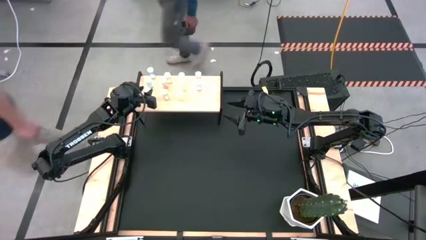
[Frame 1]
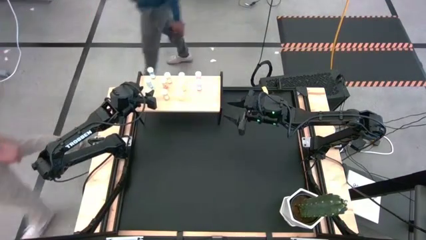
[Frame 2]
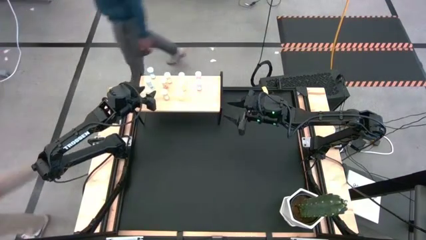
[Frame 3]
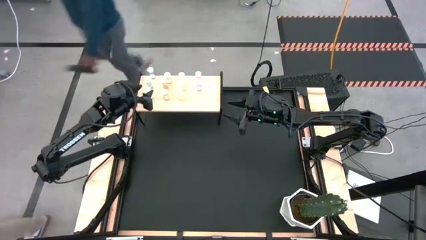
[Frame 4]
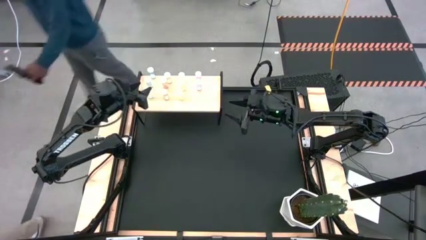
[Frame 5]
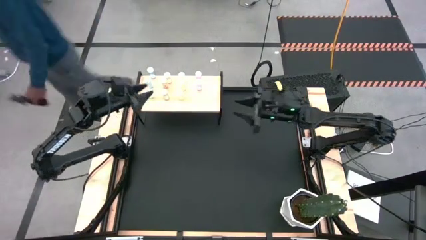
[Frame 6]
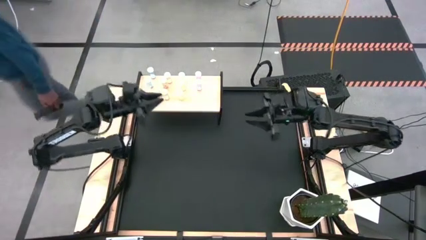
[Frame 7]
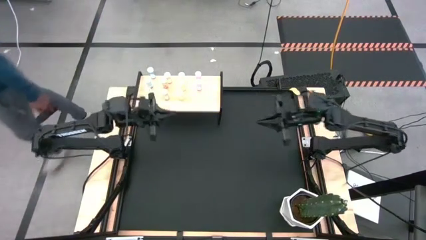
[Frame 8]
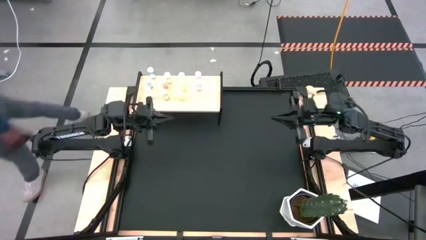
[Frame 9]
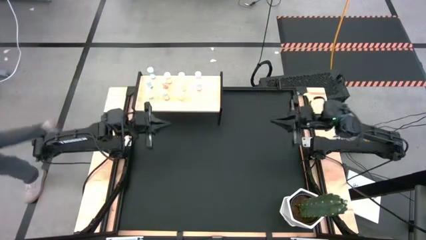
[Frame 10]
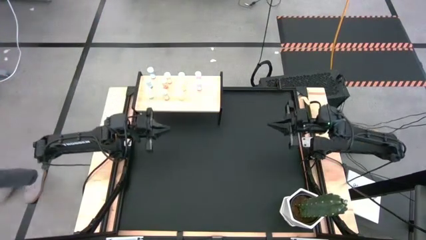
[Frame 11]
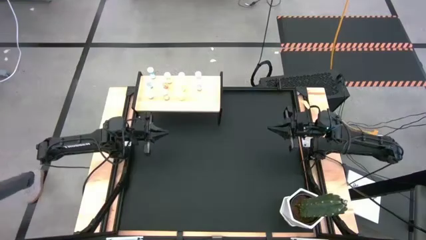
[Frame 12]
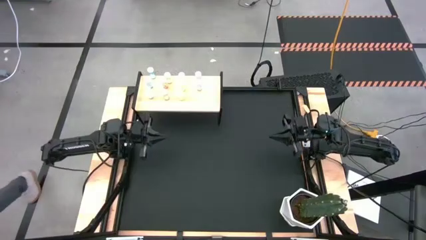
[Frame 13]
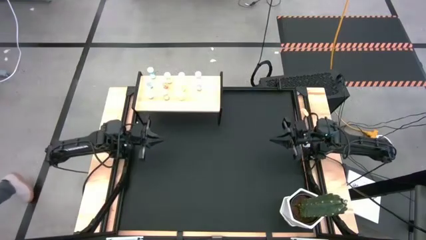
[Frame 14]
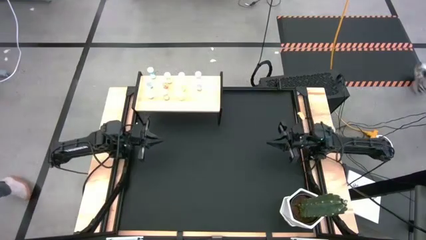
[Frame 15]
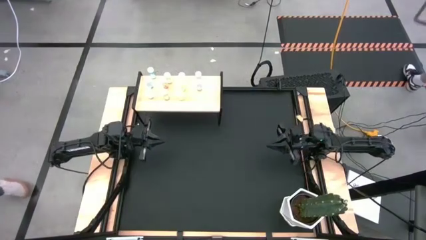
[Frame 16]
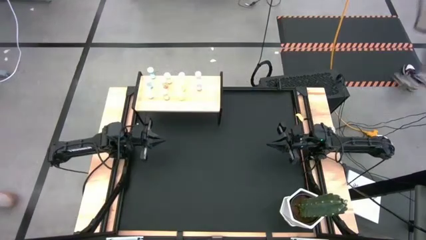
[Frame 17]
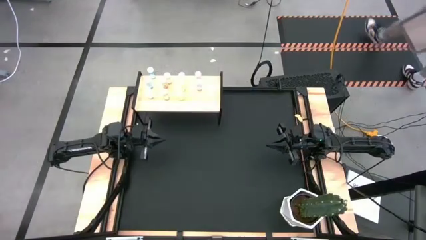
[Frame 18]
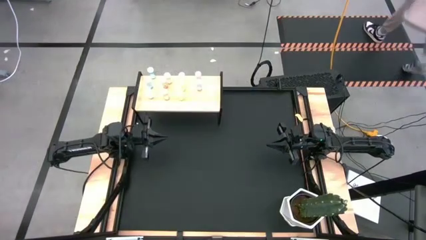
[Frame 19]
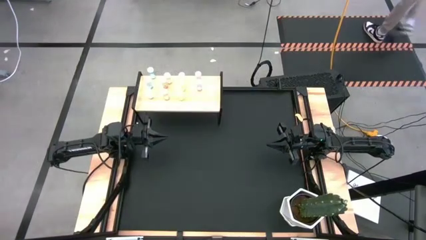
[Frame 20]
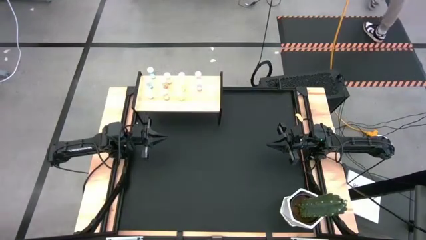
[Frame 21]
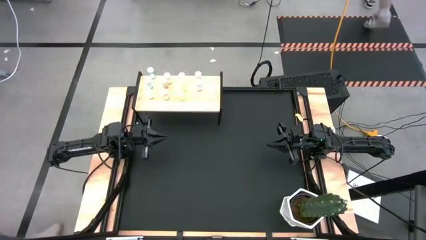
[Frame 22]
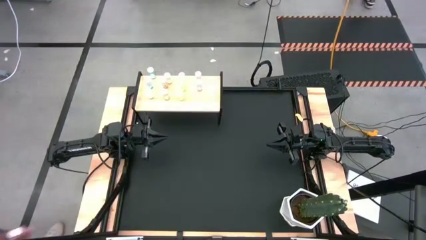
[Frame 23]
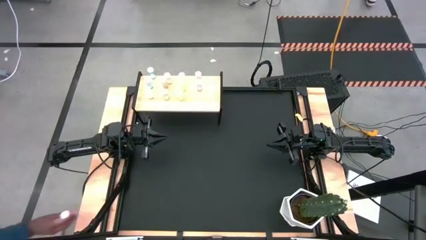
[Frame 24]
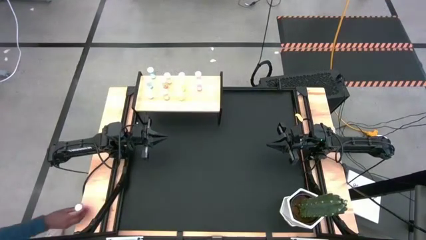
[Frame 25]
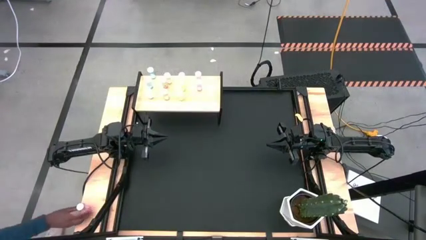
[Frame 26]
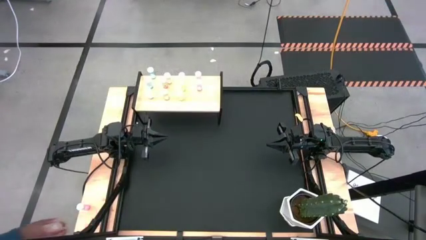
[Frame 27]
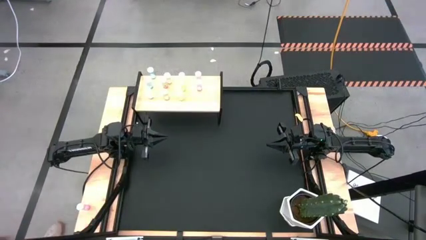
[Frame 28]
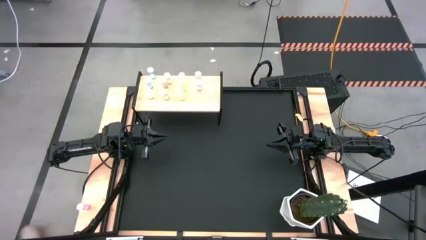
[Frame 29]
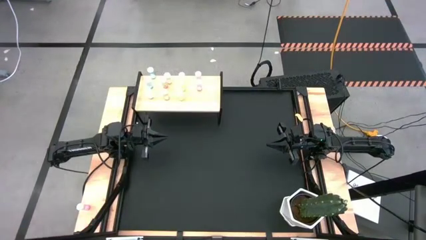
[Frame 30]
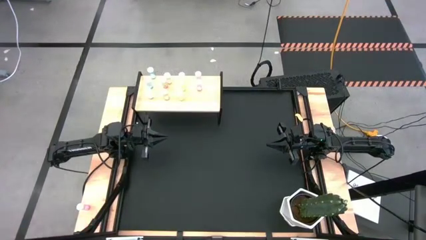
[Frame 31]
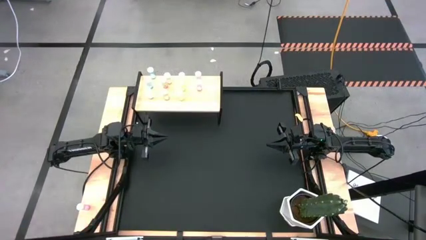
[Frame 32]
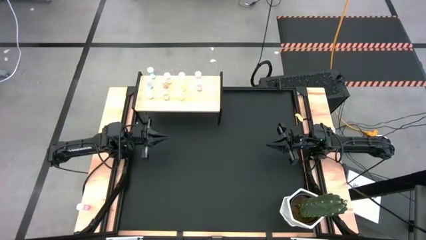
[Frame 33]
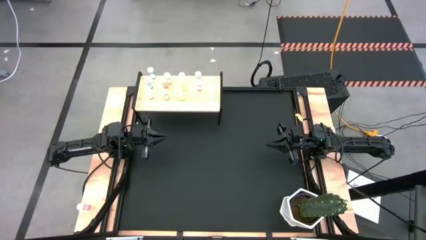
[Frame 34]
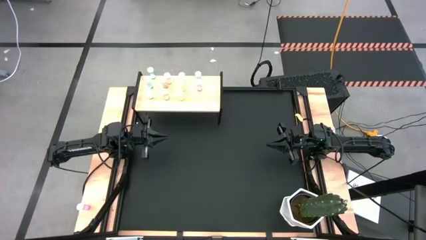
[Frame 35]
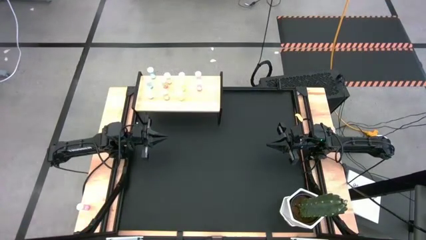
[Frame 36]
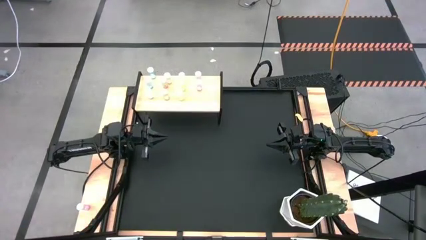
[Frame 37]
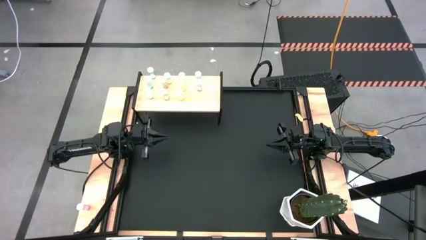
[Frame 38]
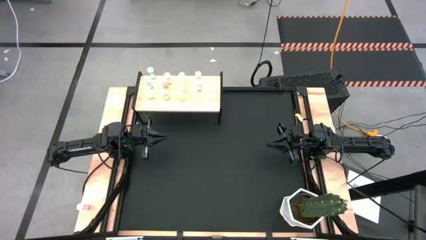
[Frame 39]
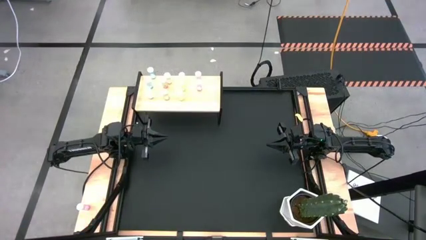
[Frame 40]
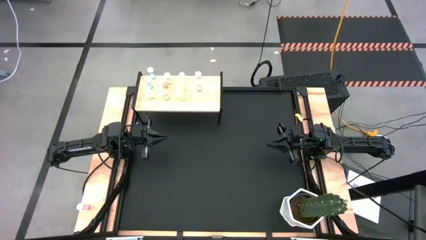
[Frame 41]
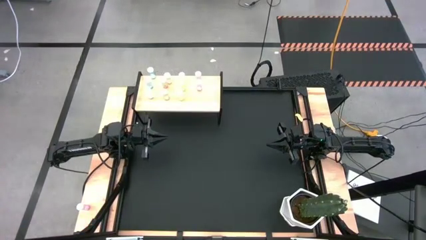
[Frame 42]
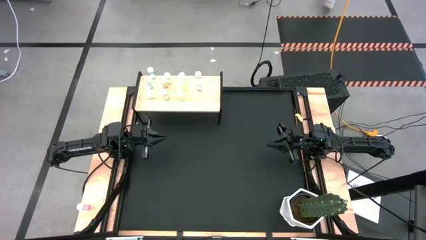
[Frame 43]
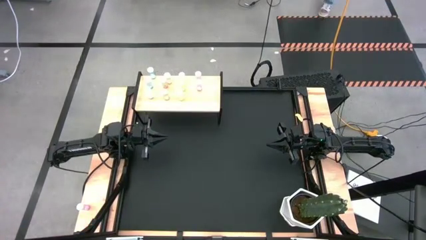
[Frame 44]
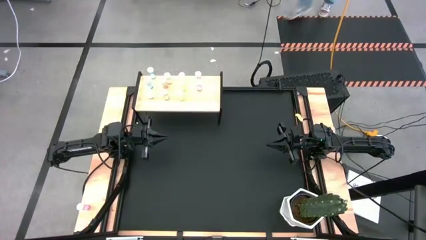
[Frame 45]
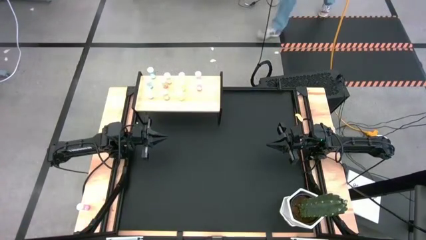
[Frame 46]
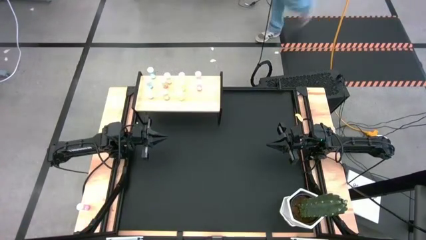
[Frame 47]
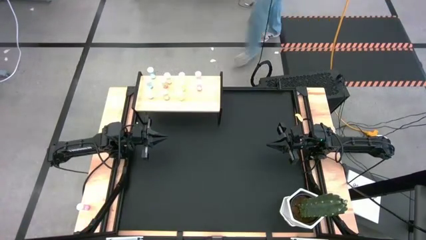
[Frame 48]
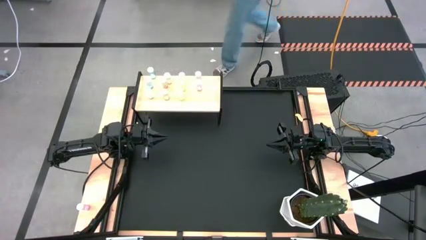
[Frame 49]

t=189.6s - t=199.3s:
Task: Pick and place medicine bottles onto shelf by color
Return to Home Position

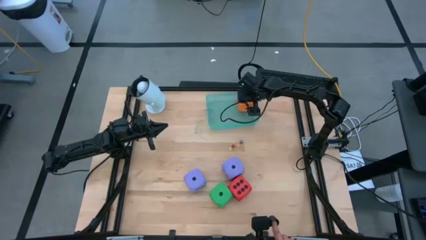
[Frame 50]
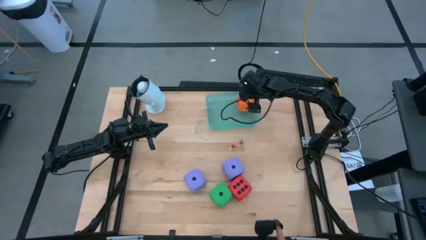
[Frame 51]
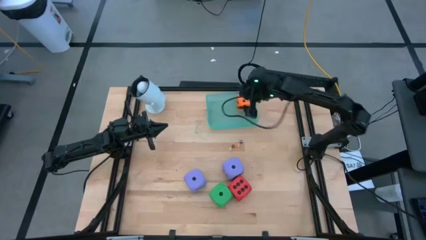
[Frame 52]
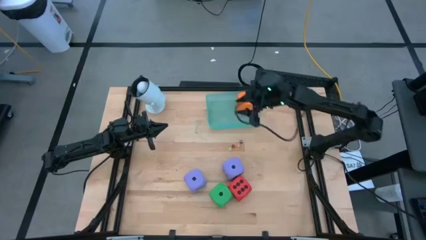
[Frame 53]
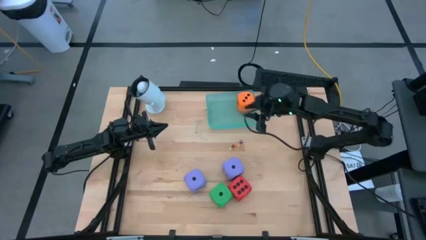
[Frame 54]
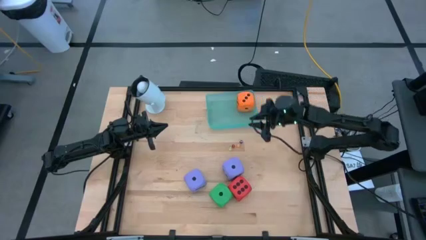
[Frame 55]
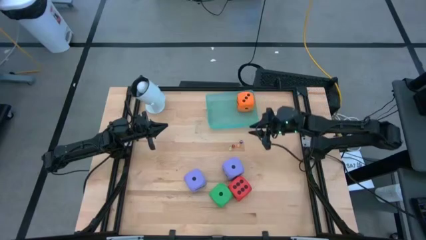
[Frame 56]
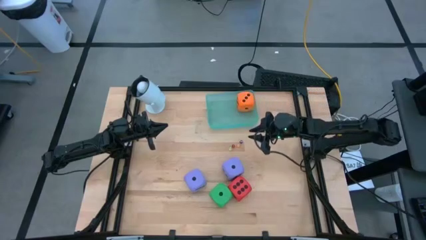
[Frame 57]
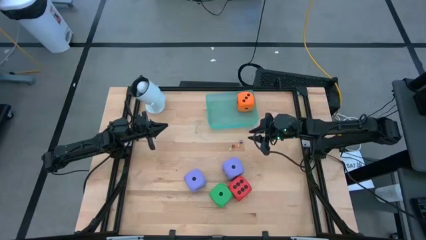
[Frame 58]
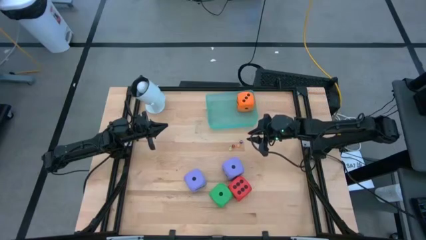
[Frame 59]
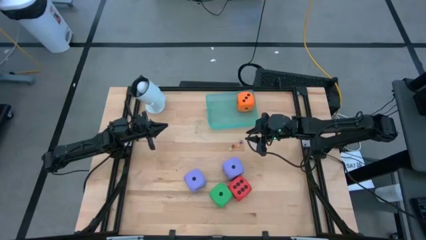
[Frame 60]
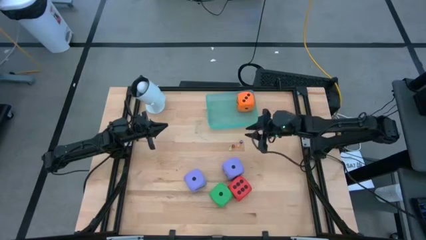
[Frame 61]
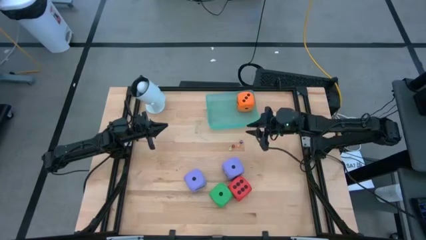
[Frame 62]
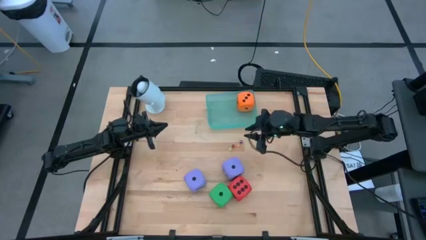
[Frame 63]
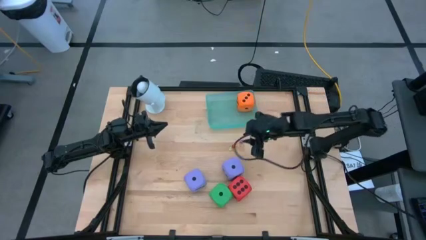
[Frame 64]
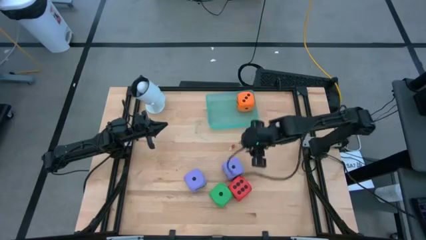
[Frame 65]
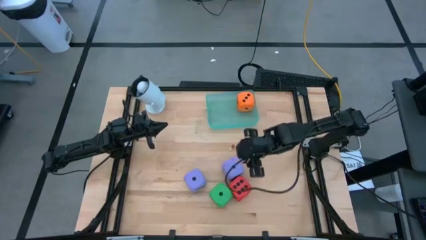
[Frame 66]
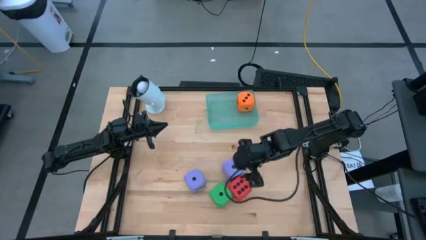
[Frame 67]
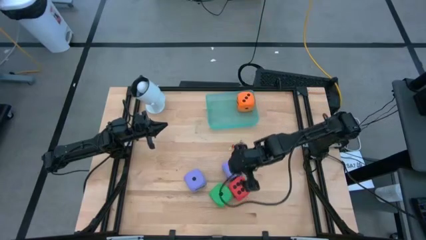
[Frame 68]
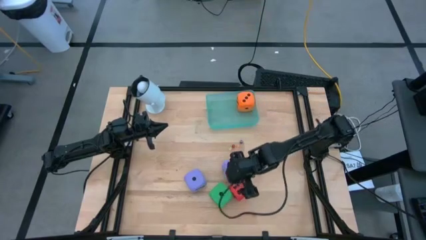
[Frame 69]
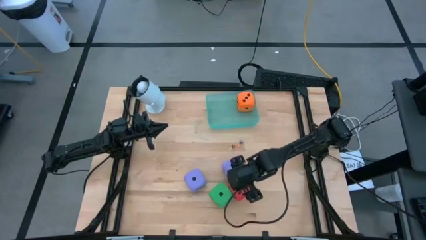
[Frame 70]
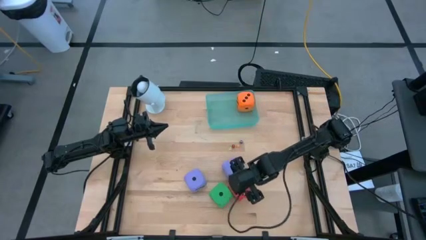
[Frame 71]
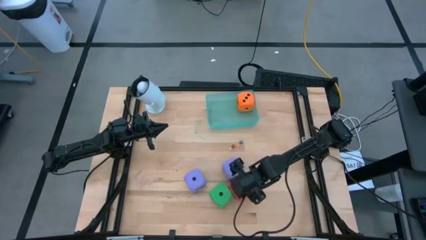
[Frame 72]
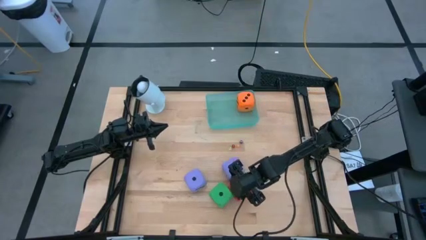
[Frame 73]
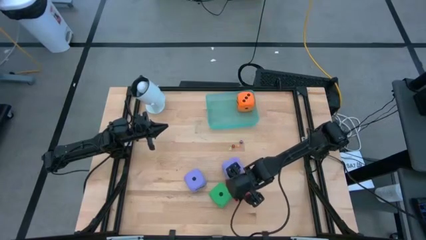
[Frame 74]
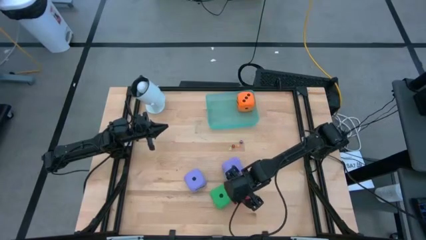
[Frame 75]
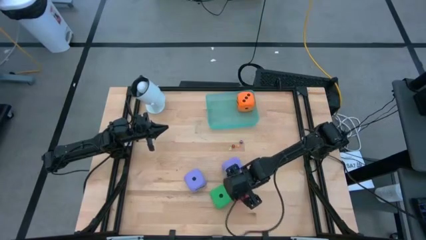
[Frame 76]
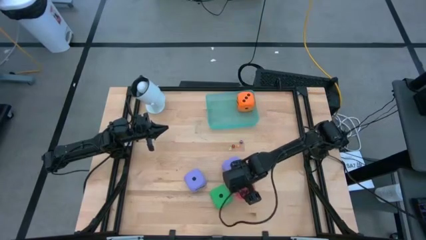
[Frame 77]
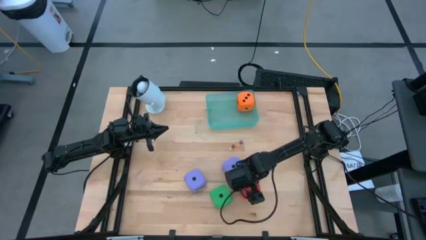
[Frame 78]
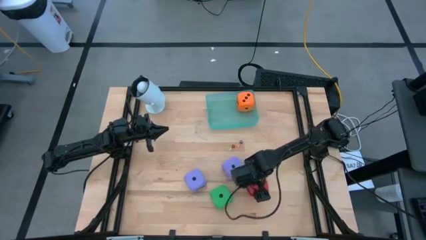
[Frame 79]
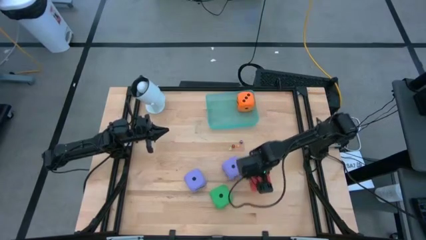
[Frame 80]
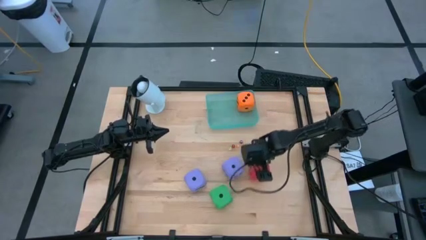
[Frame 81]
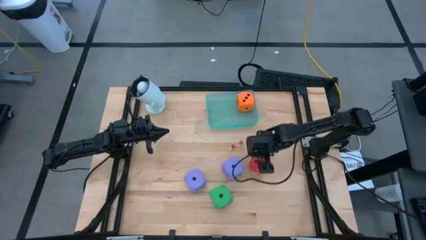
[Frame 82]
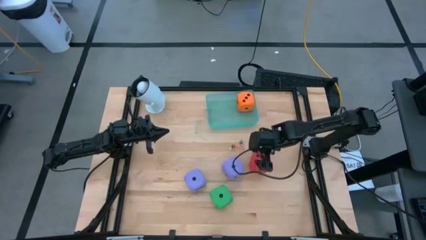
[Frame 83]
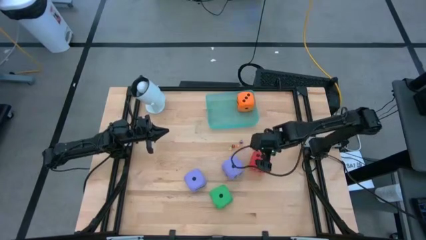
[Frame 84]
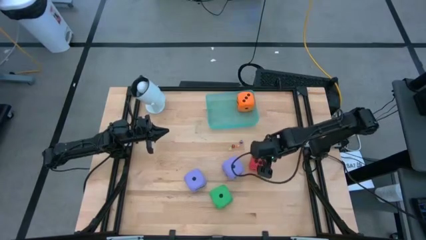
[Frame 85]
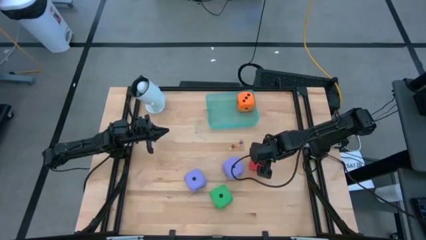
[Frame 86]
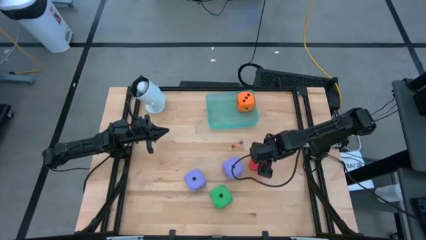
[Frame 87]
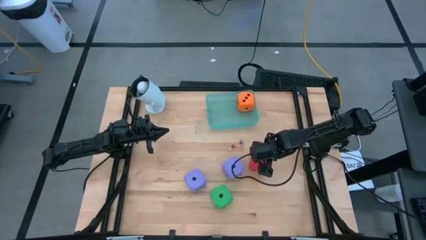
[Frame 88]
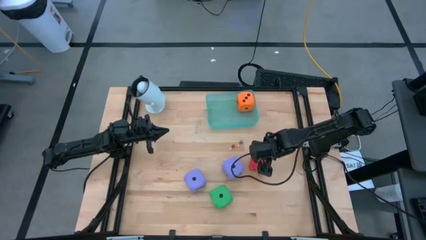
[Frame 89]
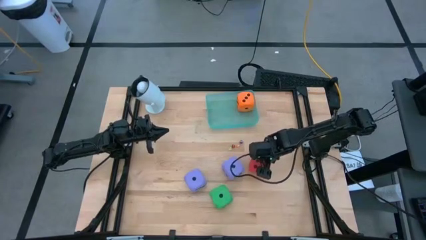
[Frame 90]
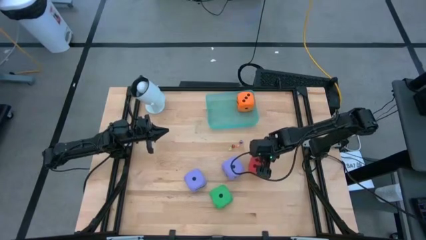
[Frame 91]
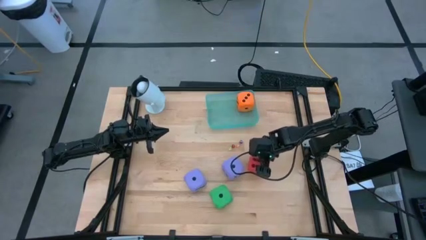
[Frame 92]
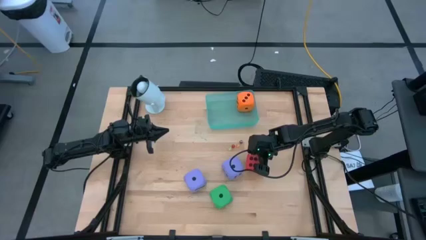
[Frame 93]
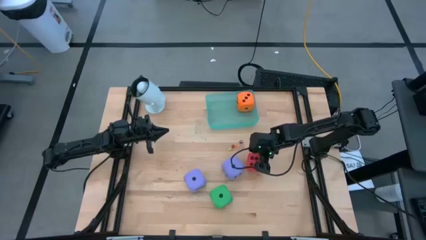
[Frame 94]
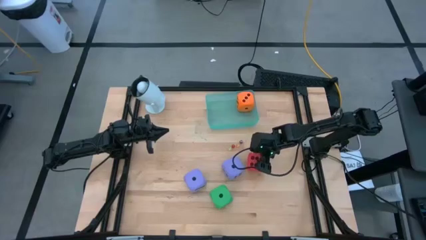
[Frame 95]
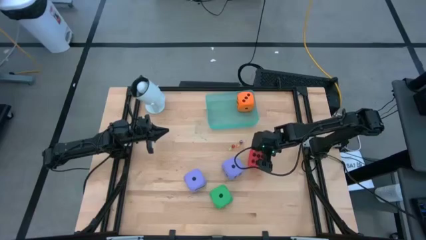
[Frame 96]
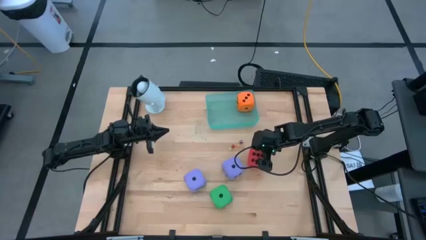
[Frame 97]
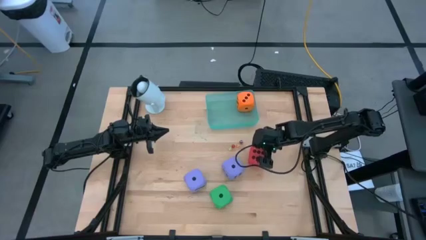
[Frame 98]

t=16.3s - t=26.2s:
Task: Pick & Place Dice
Put the big red dice into the transparent blue bin
